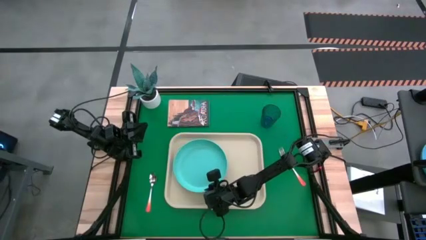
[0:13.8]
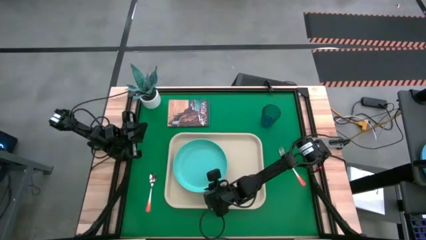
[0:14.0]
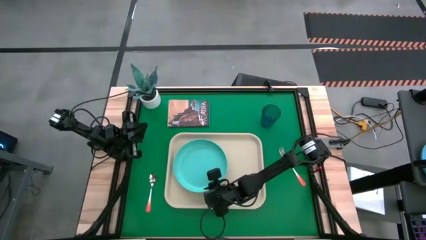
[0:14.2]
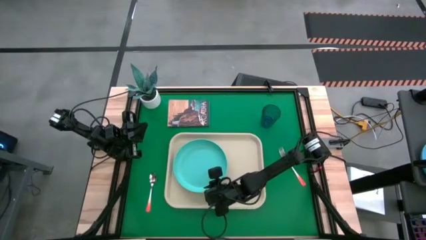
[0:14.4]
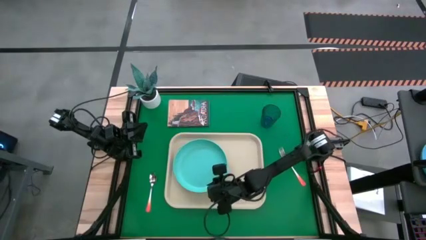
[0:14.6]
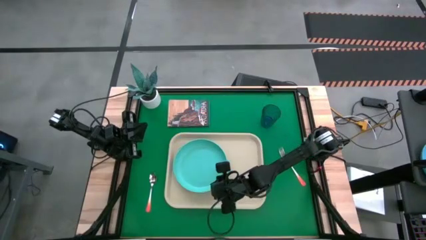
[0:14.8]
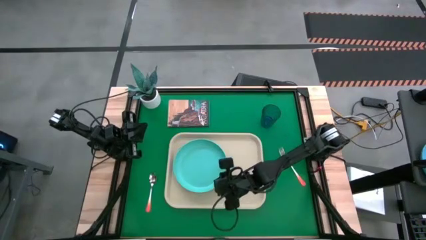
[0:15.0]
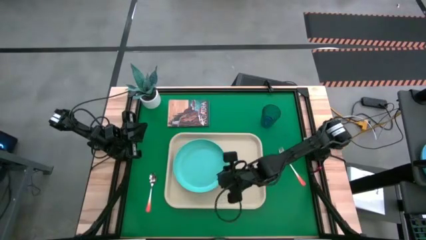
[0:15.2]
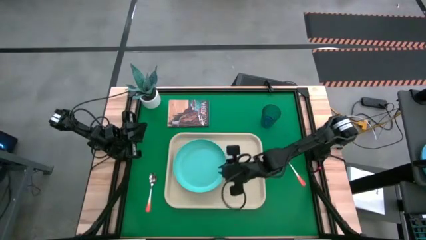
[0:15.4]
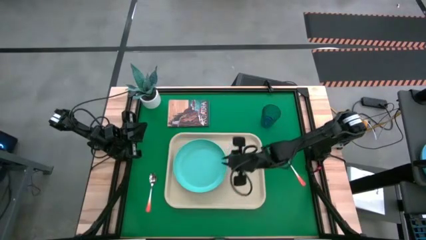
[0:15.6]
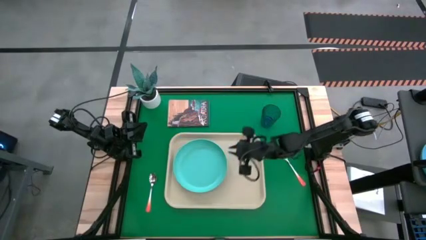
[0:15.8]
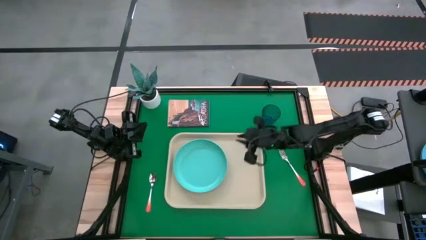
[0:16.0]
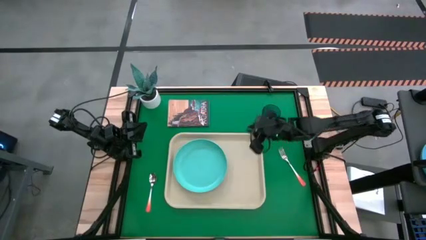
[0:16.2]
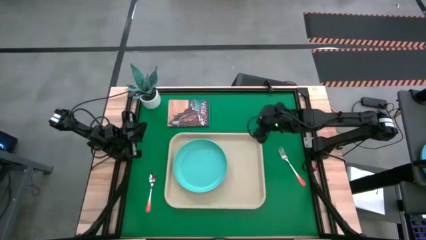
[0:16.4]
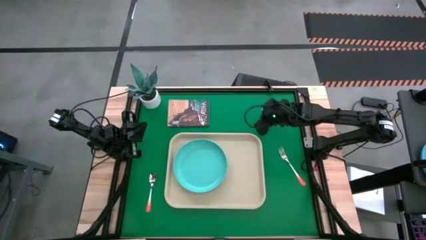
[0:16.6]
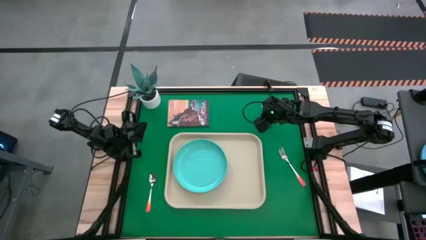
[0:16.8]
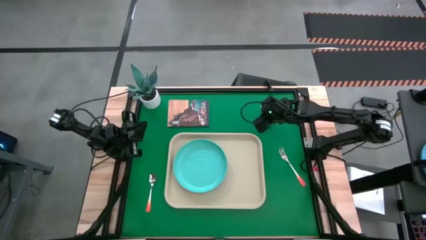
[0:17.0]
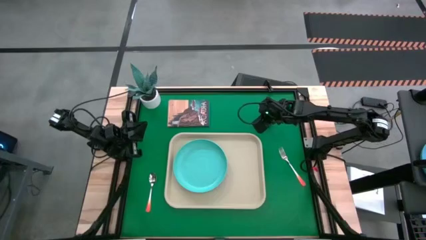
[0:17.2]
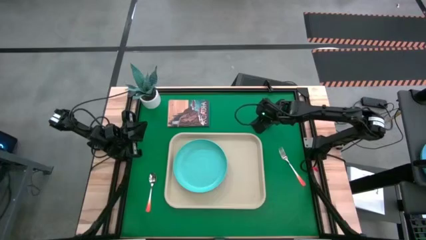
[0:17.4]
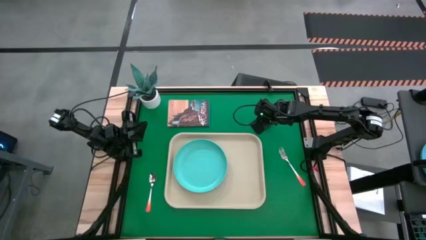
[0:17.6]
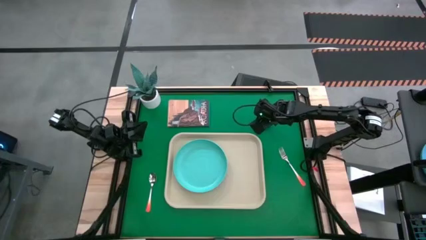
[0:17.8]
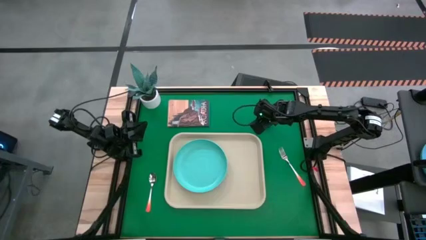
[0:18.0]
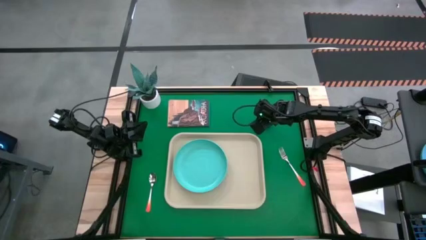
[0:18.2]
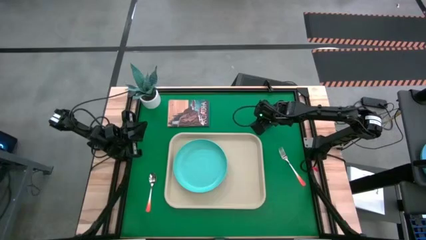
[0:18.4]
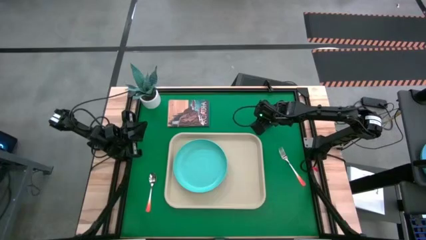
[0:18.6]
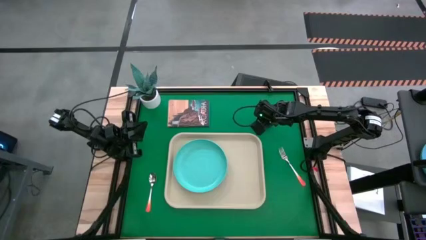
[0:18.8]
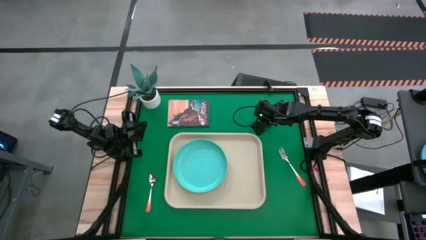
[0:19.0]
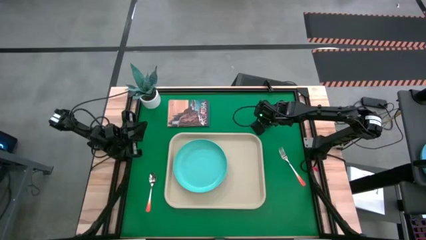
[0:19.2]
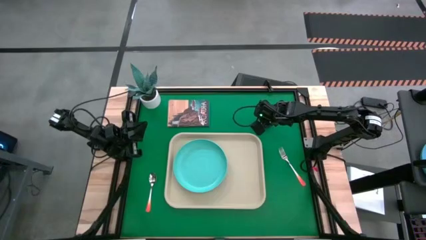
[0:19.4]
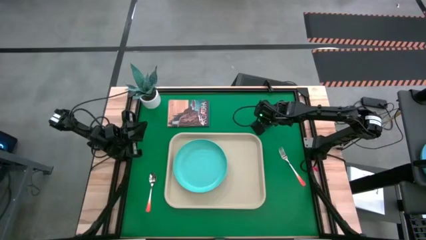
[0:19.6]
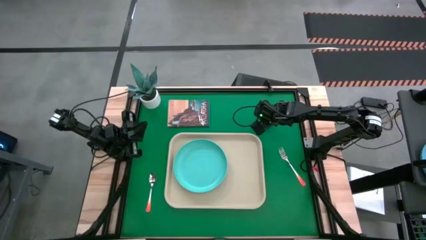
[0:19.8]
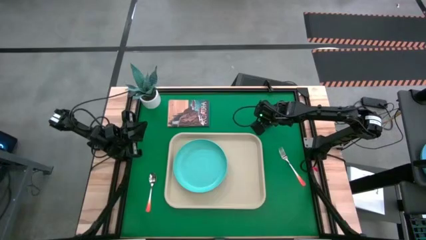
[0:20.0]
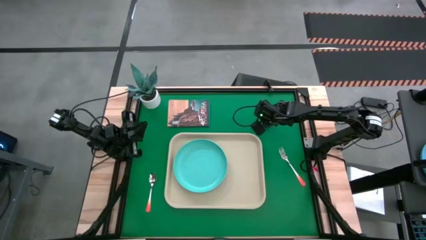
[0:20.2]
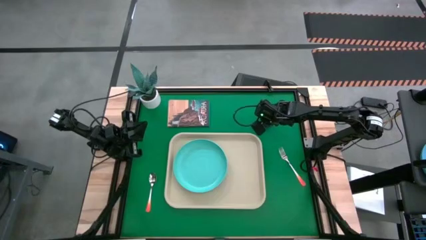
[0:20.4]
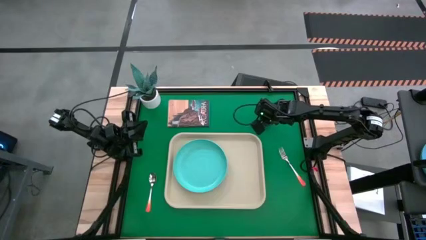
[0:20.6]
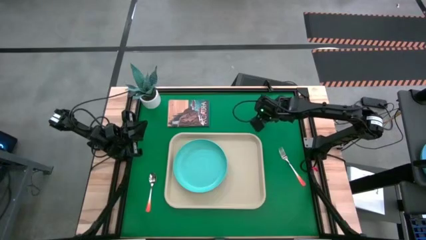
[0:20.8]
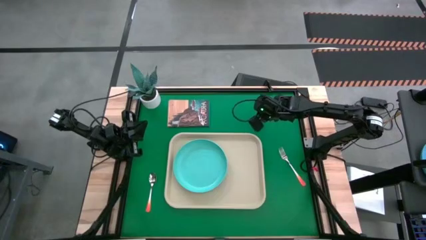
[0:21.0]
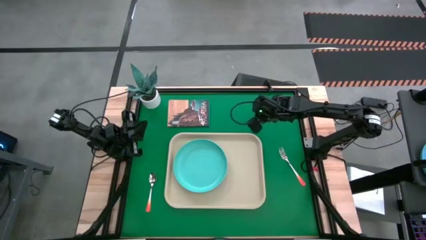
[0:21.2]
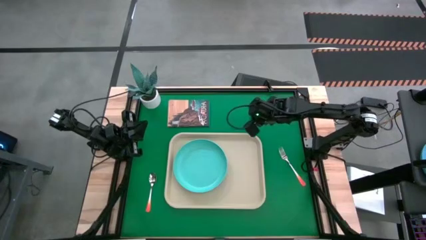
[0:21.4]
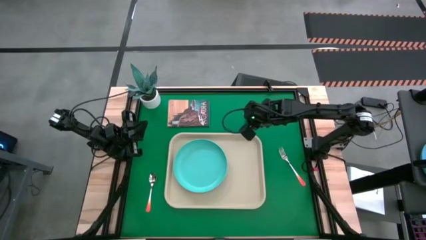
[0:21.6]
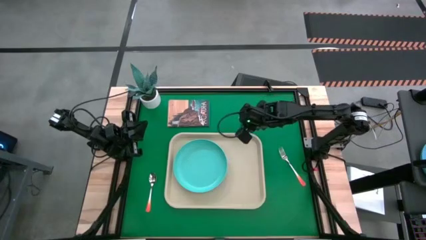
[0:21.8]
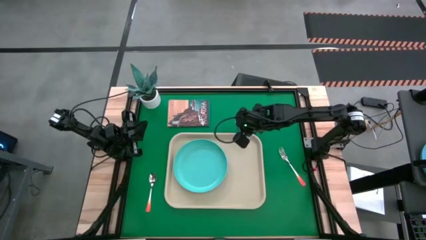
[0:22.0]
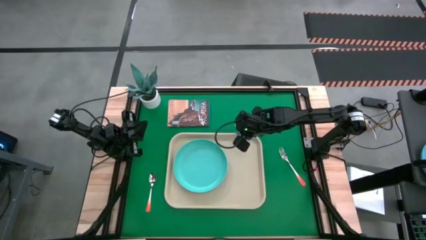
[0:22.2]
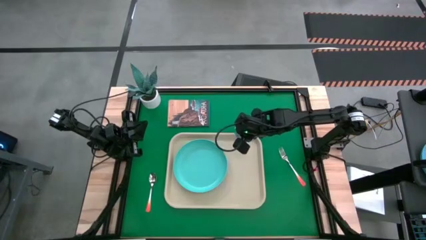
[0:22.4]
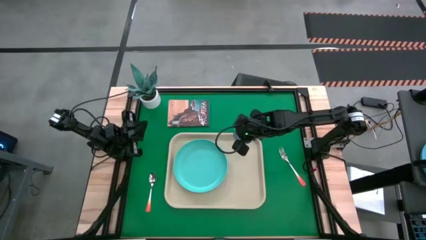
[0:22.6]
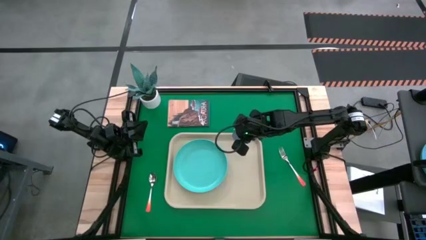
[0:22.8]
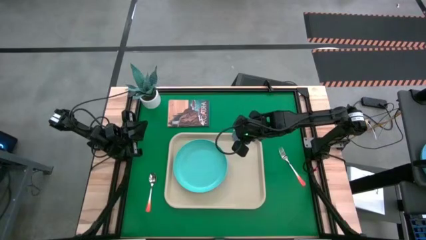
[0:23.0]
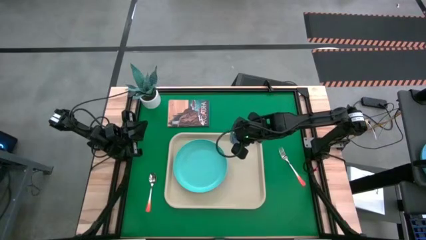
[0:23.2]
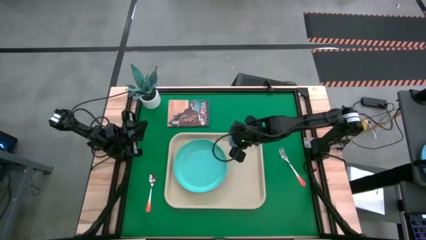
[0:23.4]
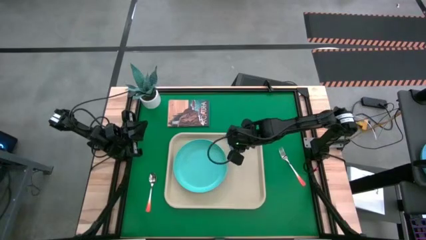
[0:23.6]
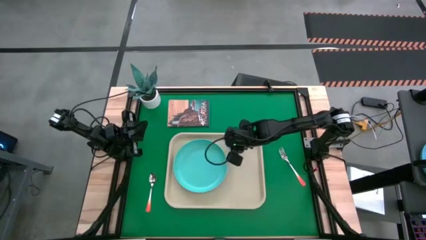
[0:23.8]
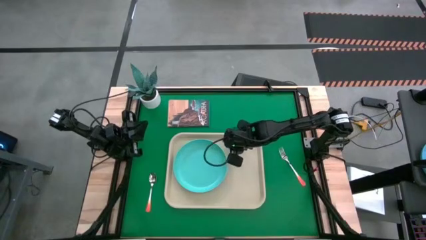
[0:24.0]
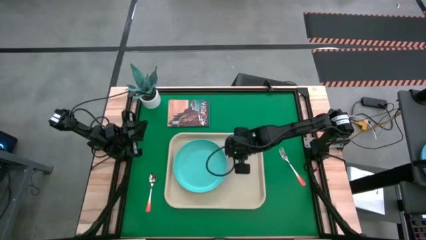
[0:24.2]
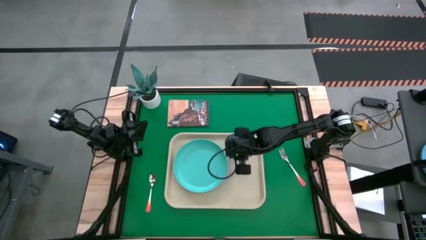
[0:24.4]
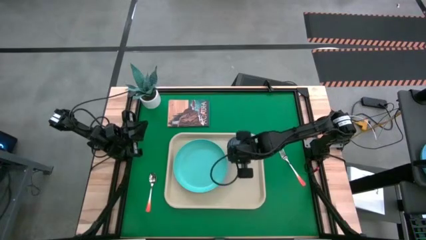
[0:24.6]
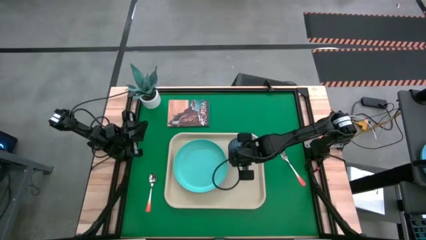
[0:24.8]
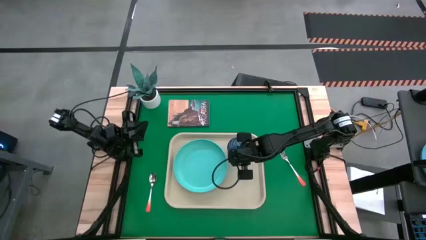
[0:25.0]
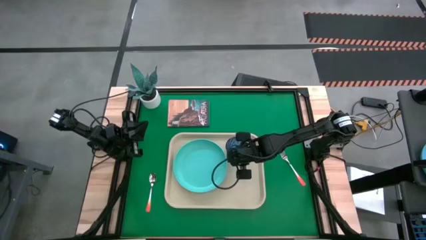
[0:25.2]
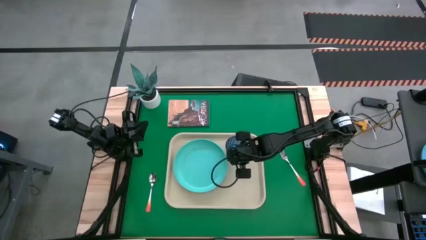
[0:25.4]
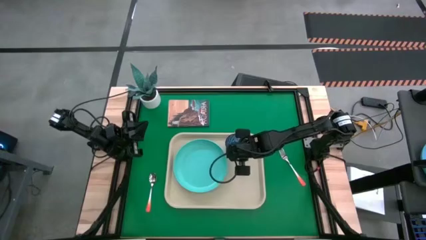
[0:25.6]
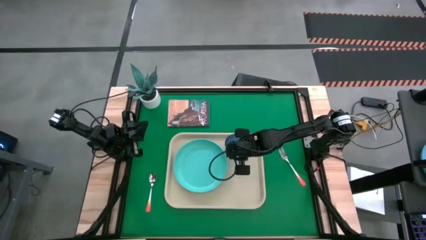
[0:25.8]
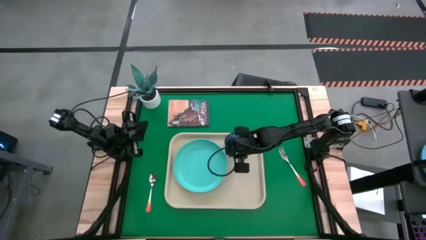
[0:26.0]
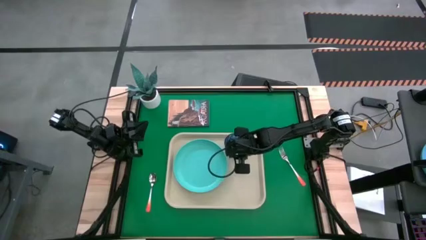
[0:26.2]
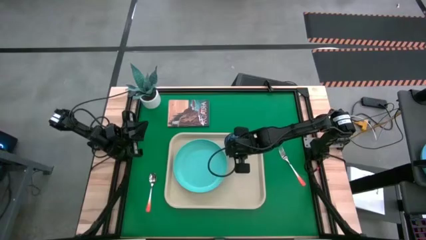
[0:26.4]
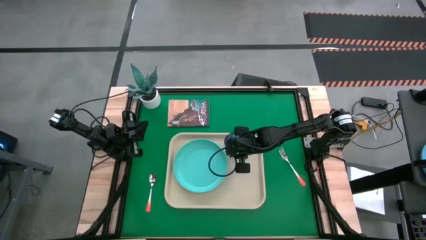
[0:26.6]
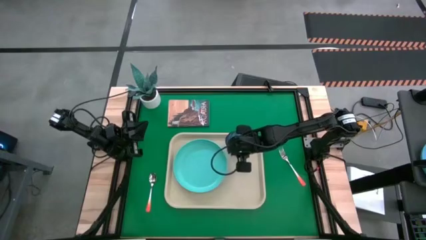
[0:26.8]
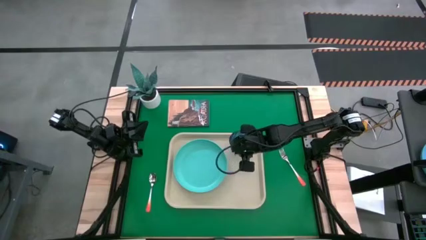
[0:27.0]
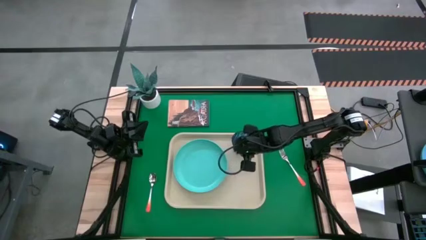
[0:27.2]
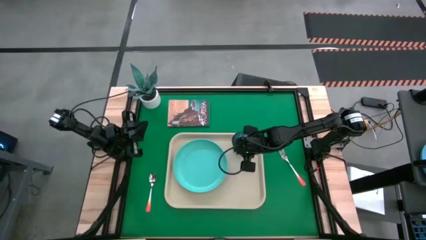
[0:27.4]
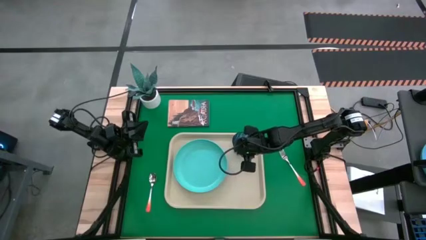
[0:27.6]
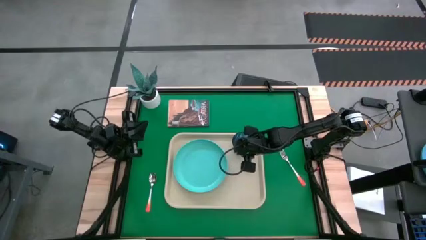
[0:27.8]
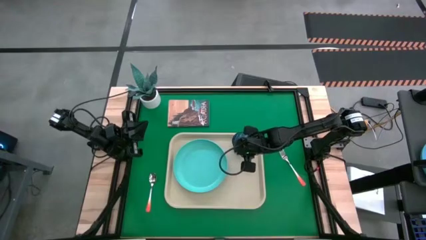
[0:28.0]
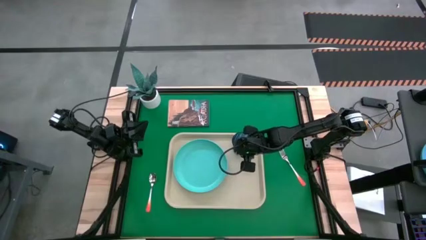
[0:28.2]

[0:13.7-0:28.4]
Task: Pick and place plate/cup/fork/spoon on tray
Put the blue glass in the top right corner of the serving tray
